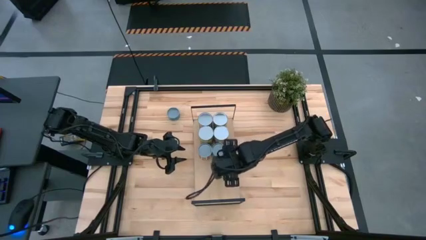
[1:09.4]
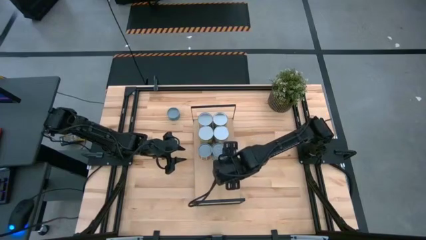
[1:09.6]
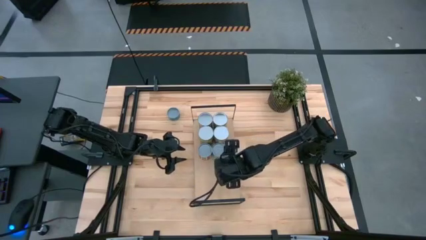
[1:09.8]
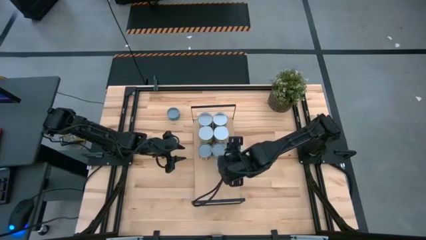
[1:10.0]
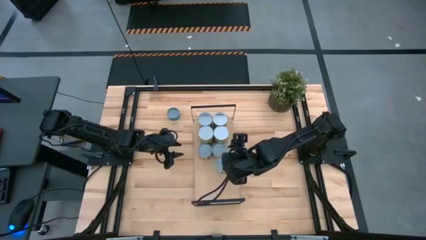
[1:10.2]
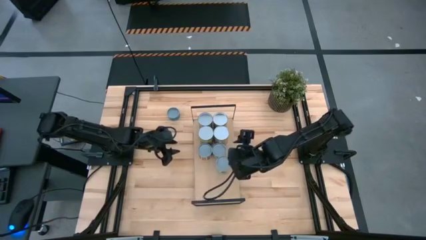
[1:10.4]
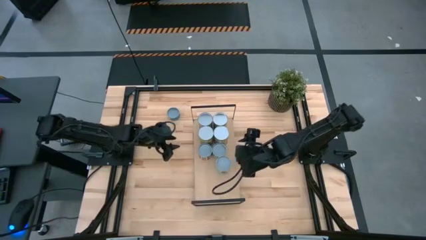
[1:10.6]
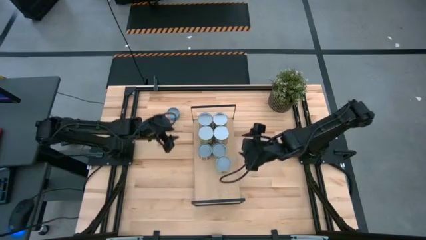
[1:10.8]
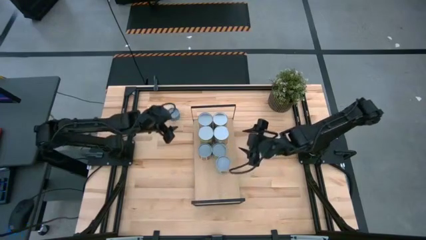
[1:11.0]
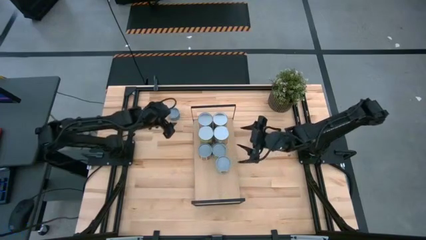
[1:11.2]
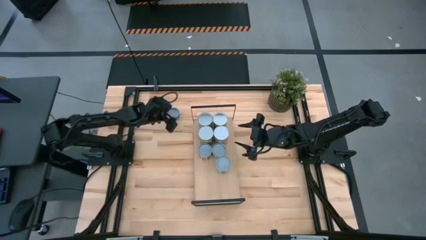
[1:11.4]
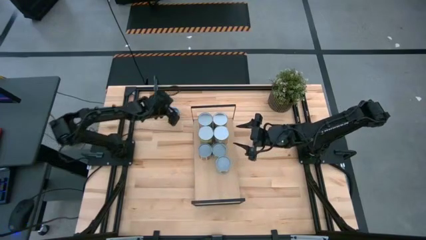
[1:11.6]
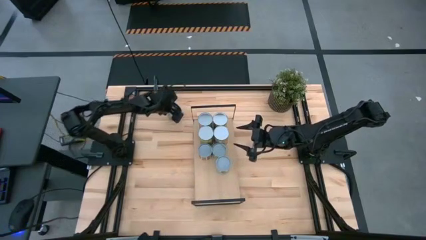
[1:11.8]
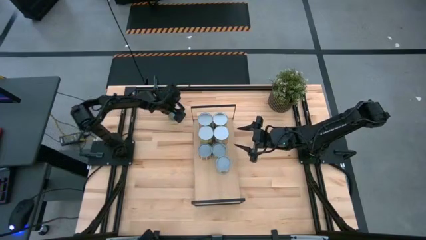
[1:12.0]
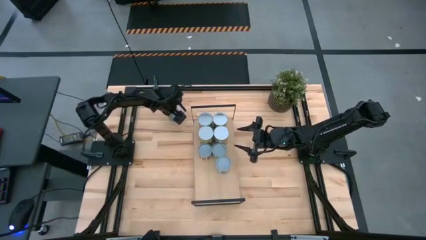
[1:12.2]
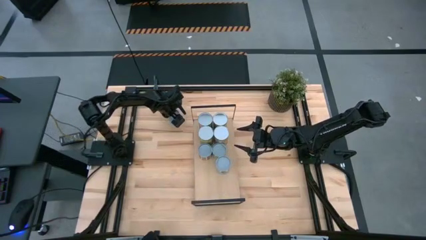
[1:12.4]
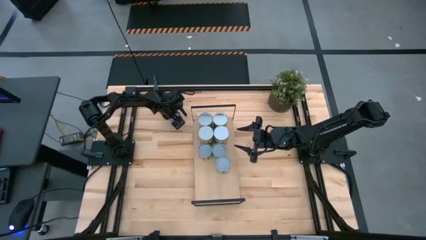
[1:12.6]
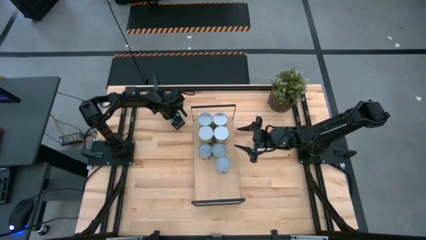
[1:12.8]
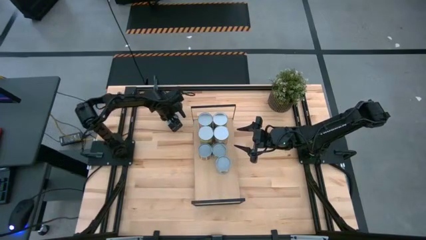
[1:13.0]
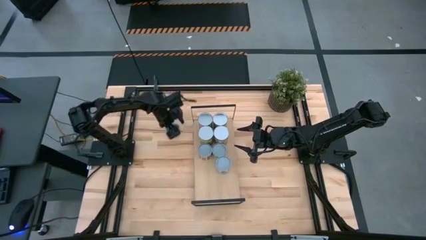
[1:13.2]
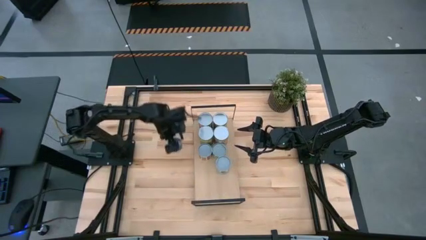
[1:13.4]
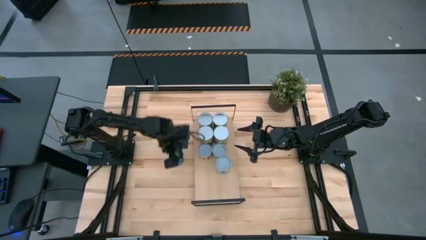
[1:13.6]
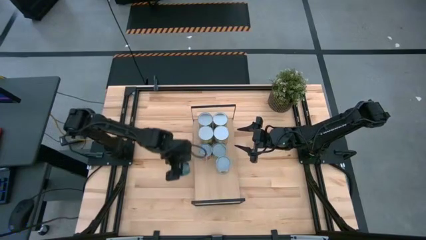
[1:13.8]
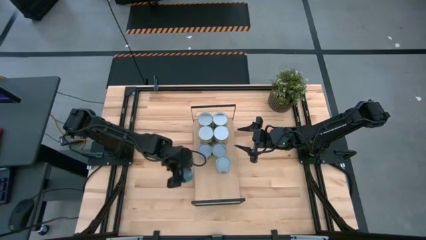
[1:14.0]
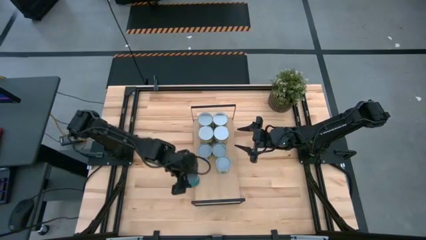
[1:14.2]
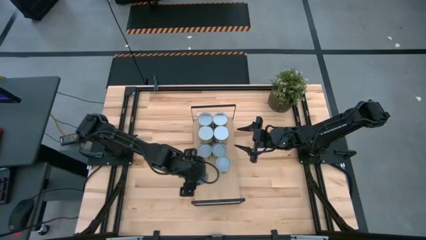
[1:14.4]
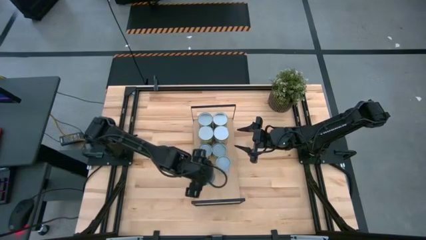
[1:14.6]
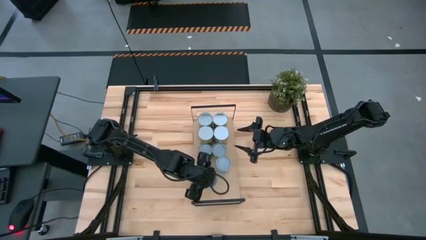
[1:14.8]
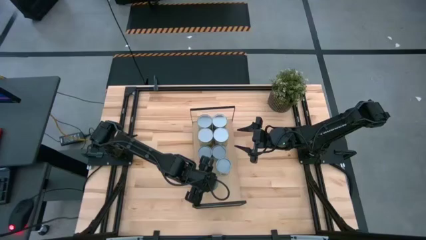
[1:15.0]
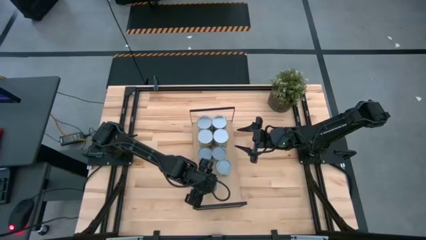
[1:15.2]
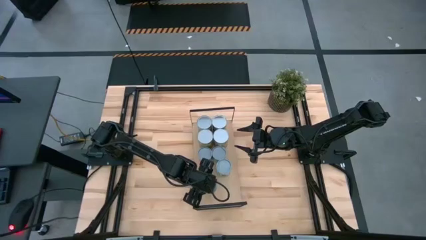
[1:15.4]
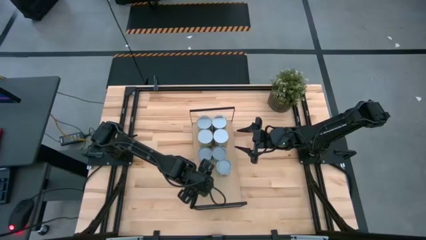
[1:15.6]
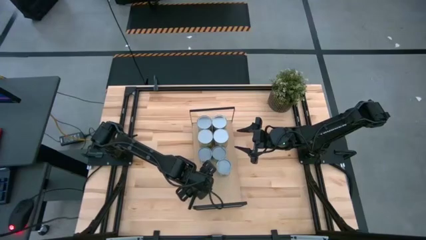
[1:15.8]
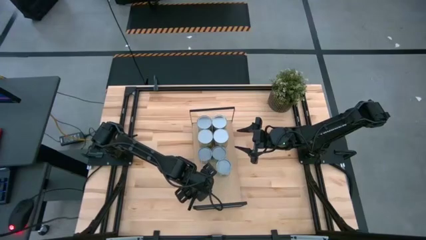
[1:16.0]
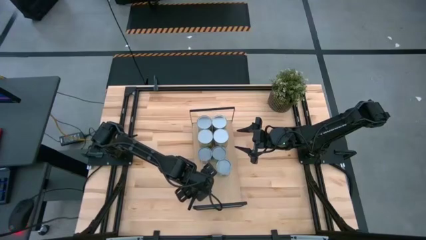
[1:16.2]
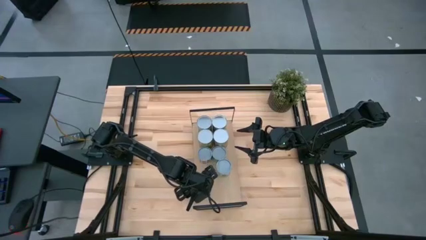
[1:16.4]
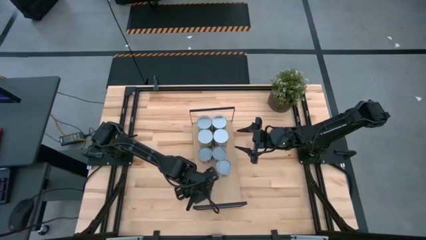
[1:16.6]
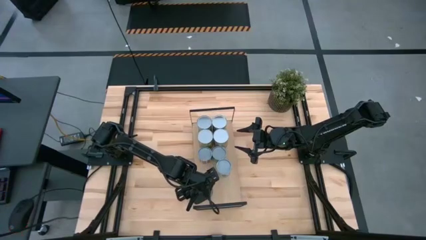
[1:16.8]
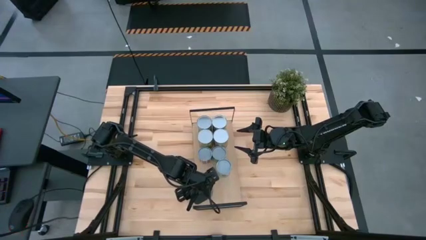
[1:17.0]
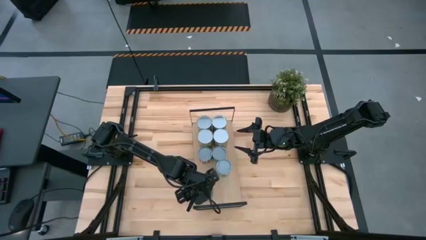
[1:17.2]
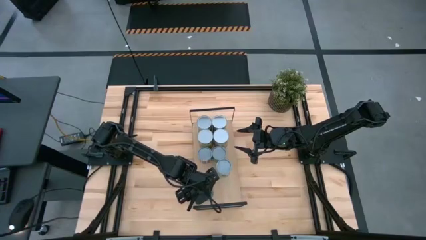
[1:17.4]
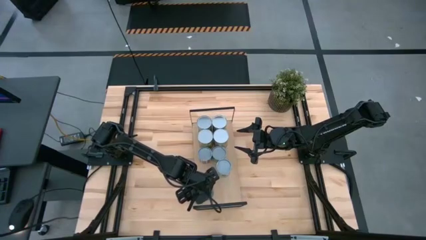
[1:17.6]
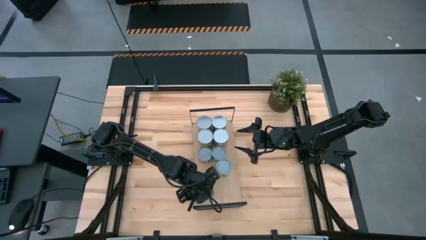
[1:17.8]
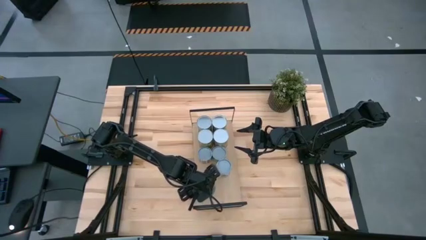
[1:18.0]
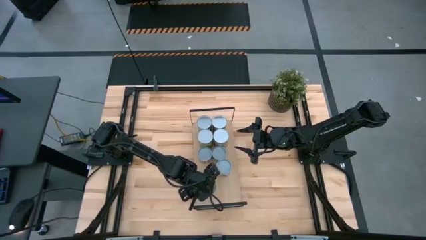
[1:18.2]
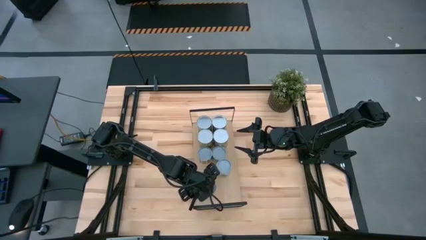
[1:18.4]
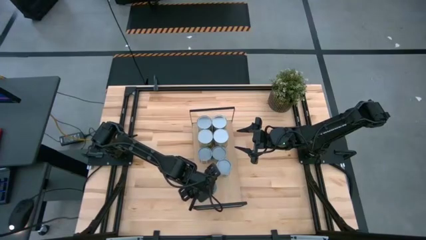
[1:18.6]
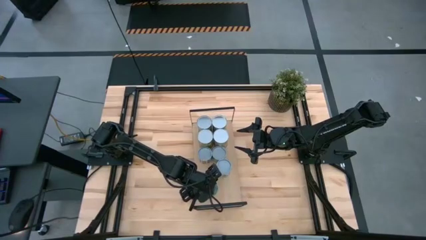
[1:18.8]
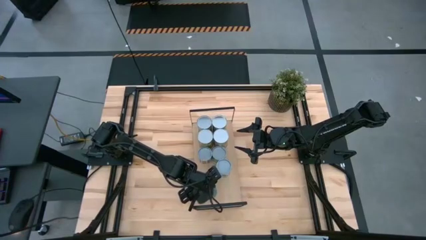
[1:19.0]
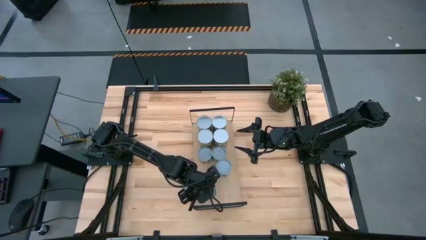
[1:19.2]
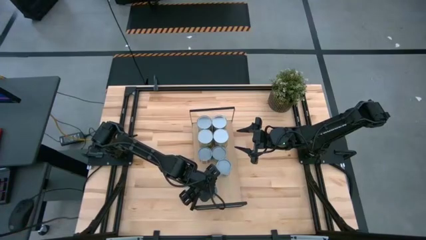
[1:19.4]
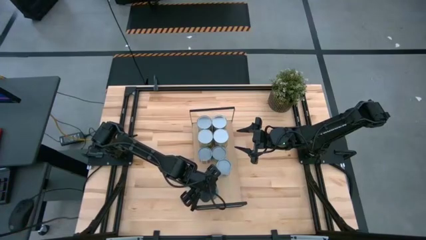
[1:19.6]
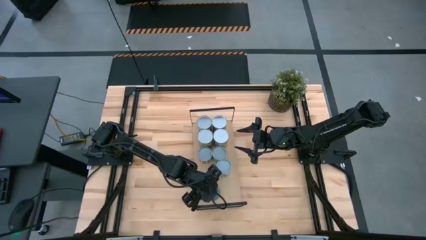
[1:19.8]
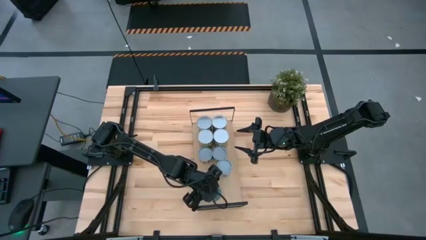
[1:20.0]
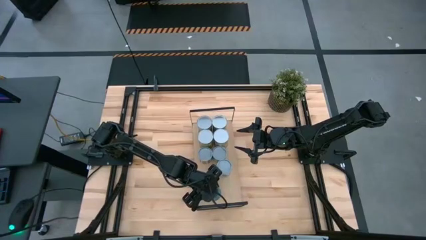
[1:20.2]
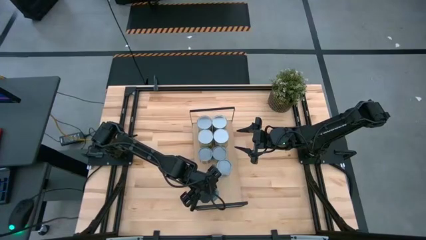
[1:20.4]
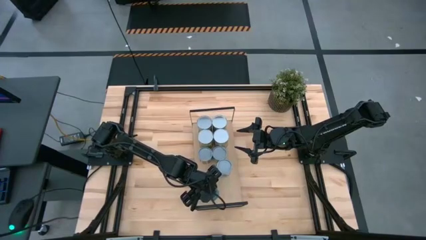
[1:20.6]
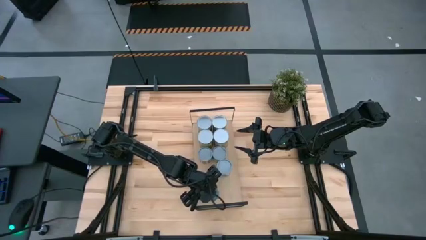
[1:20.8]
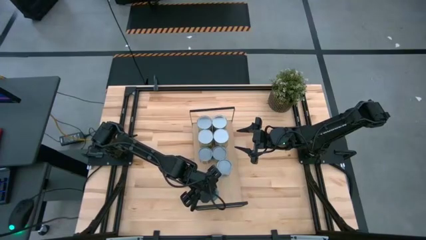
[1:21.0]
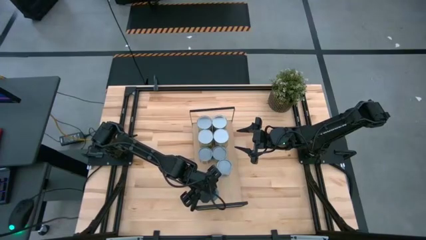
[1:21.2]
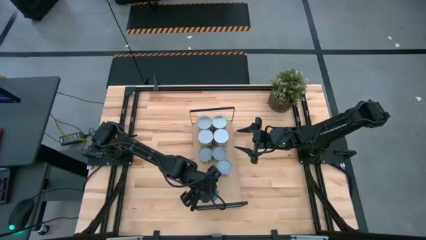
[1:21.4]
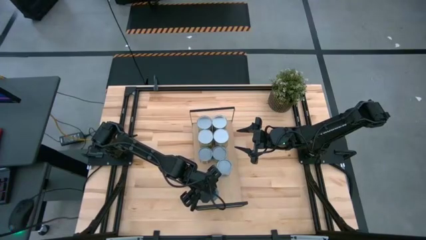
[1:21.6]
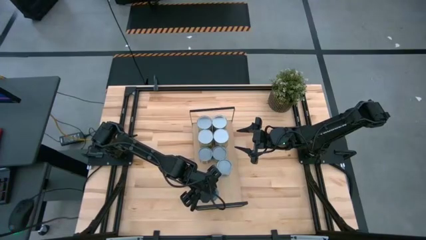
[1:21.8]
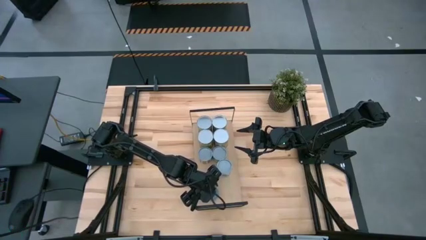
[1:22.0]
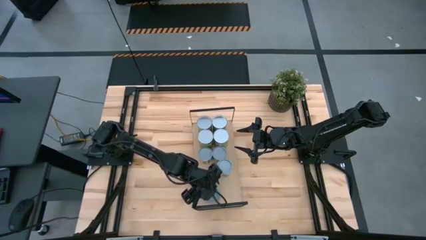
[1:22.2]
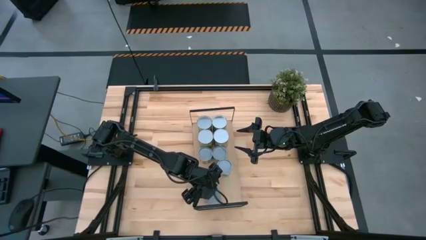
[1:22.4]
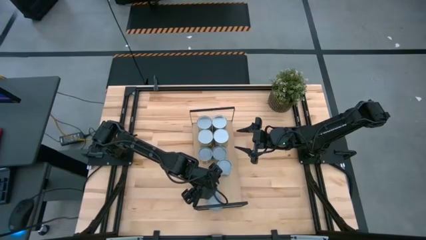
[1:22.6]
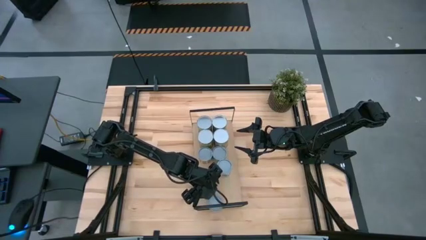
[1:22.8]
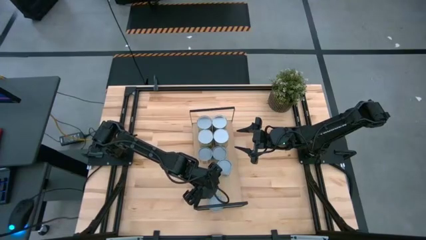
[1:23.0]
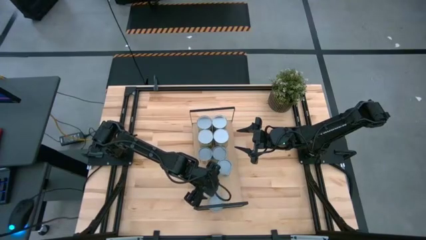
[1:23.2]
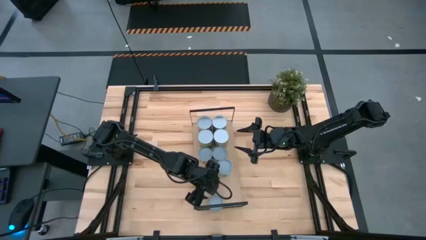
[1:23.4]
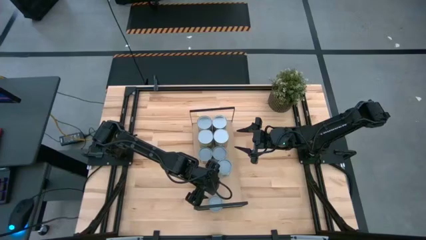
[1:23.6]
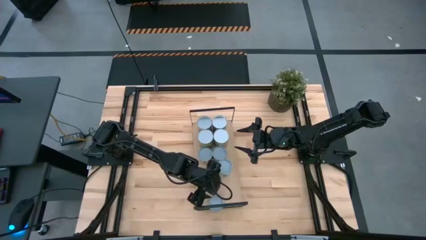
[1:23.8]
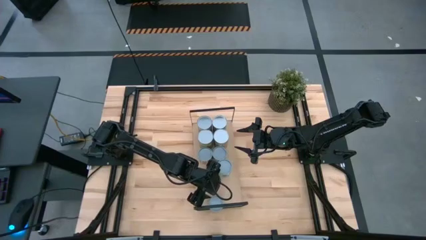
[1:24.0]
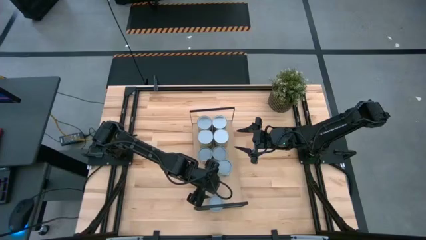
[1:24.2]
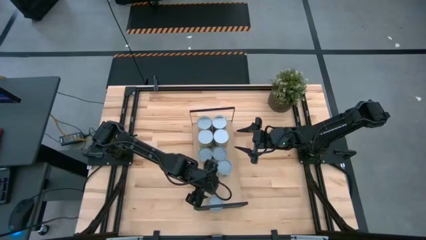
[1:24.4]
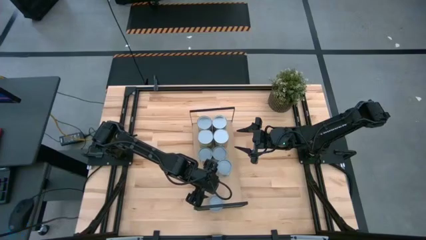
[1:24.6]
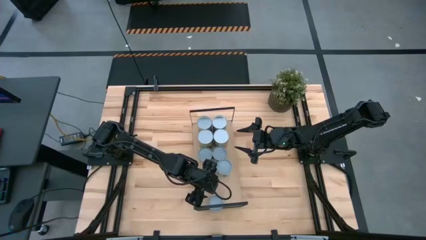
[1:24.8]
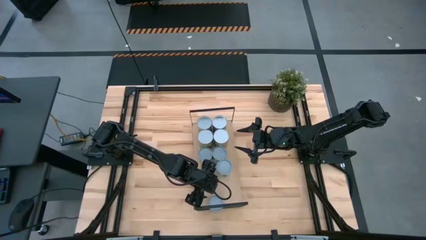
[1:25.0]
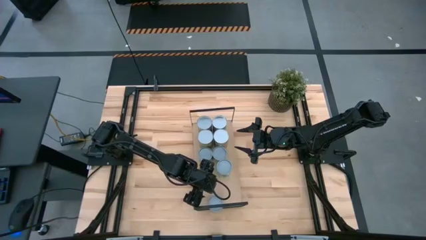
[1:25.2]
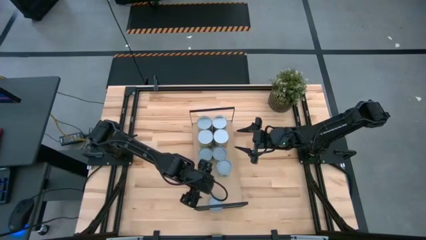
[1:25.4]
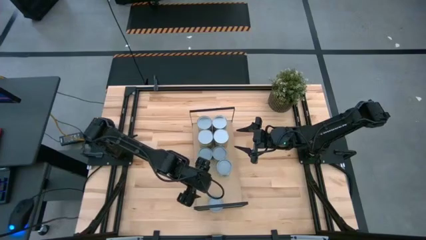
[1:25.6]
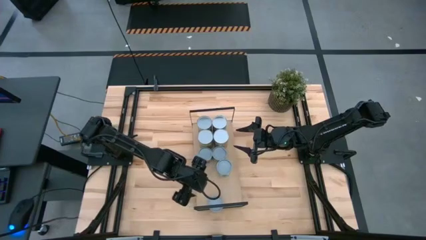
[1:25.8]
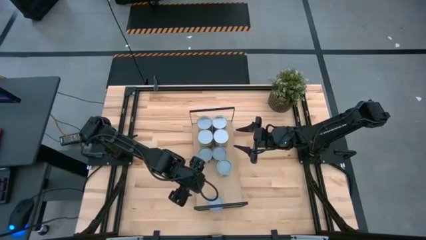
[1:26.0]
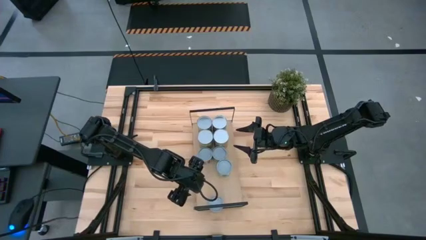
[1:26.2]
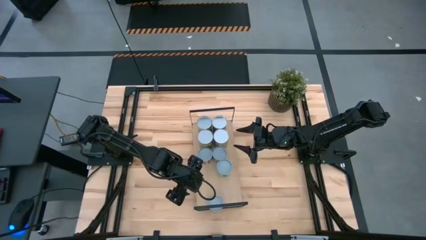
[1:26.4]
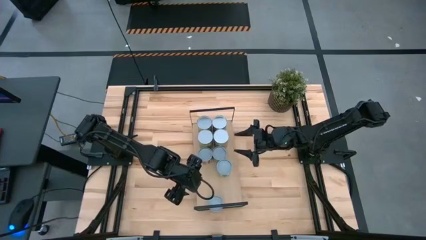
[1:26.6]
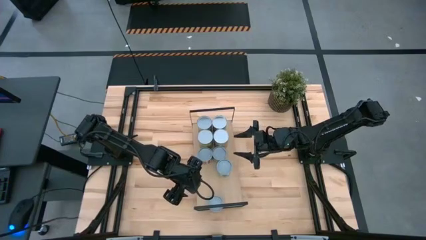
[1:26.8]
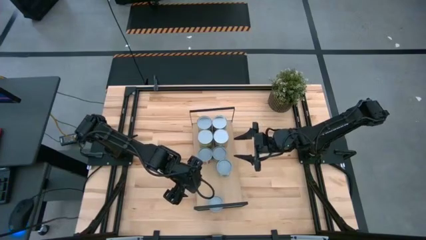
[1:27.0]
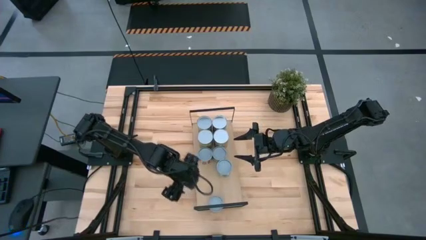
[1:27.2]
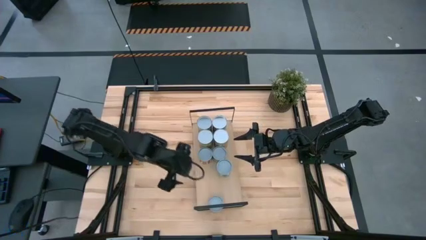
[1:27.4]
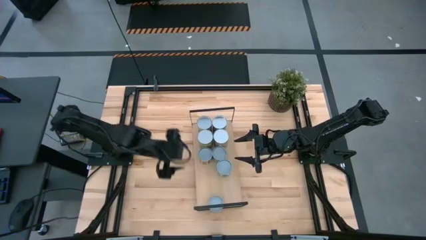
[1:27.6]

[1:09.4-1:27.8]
Task: Pick and place cans onto a shelf
Put the canned tuna on the shelf
